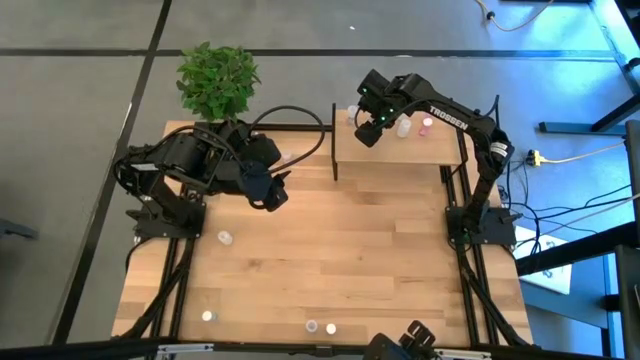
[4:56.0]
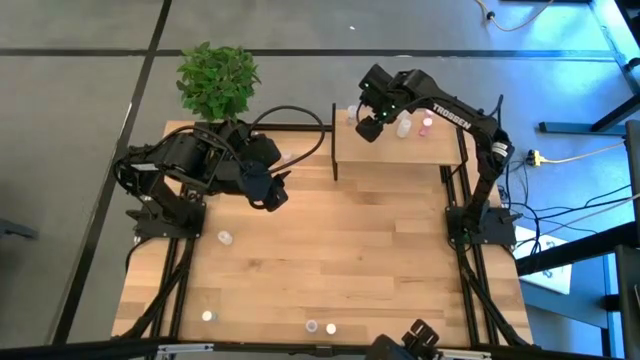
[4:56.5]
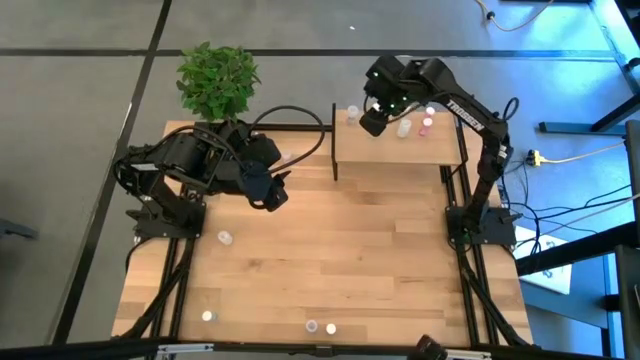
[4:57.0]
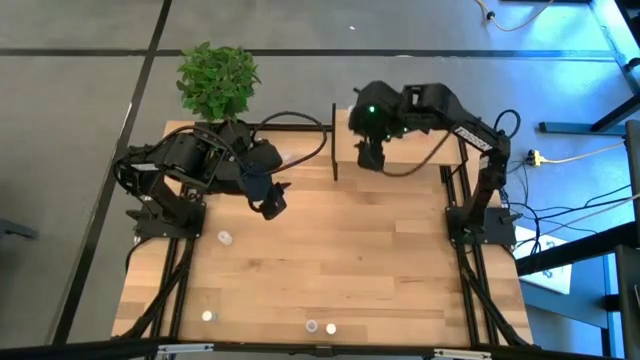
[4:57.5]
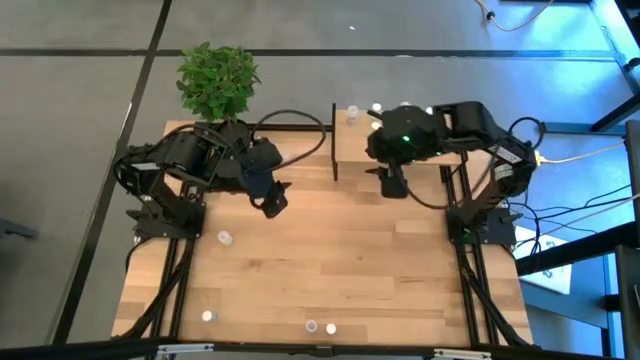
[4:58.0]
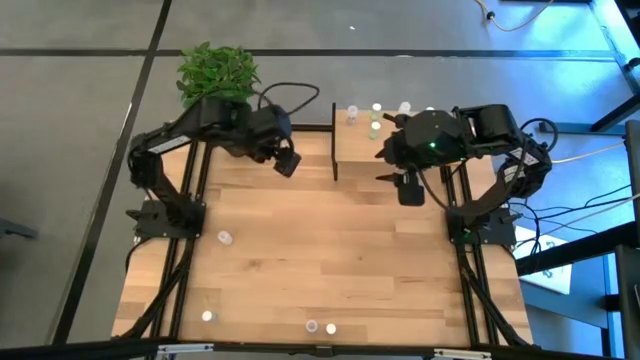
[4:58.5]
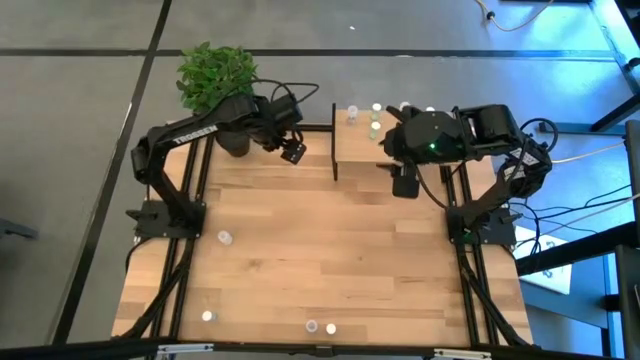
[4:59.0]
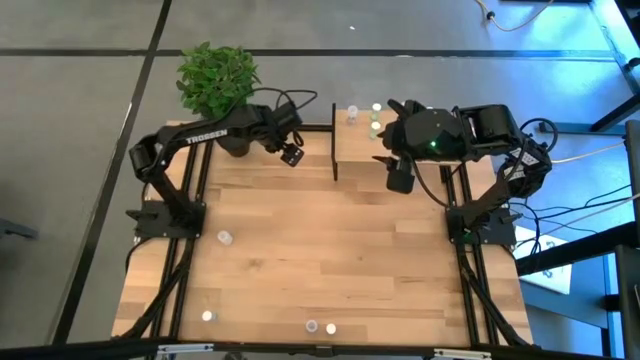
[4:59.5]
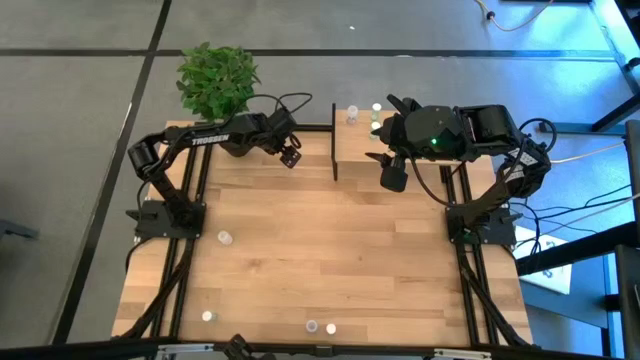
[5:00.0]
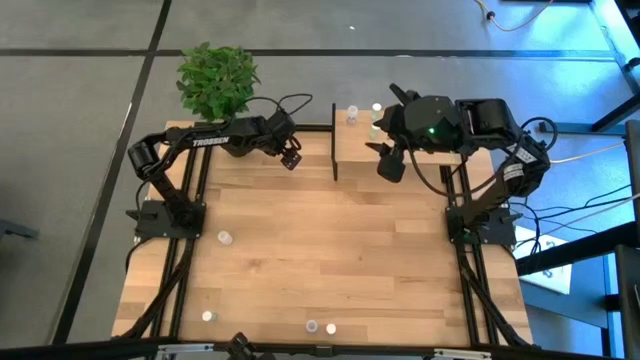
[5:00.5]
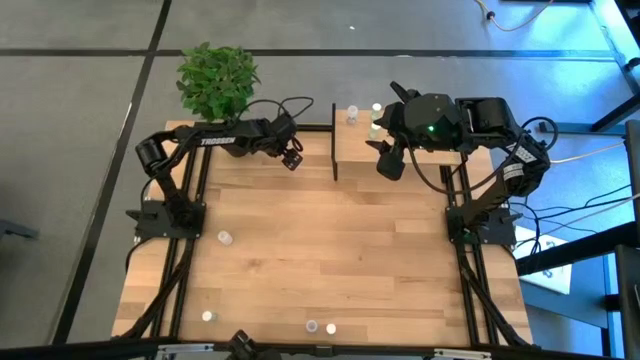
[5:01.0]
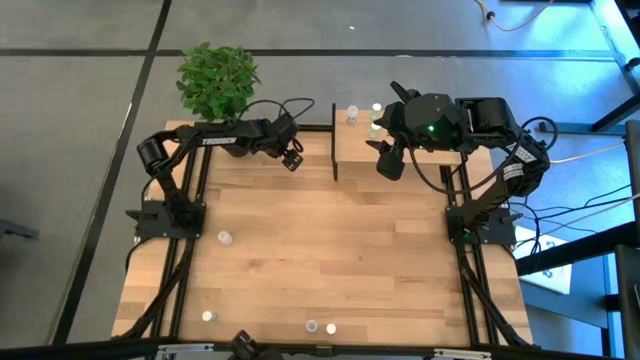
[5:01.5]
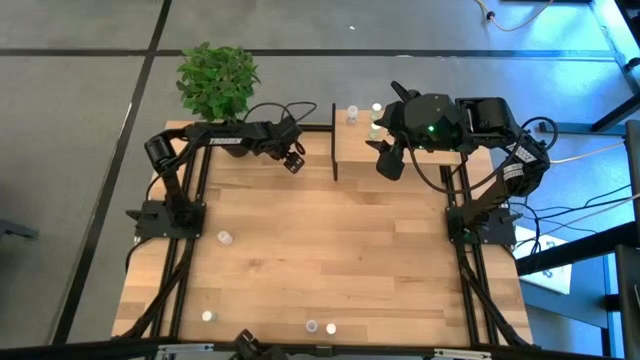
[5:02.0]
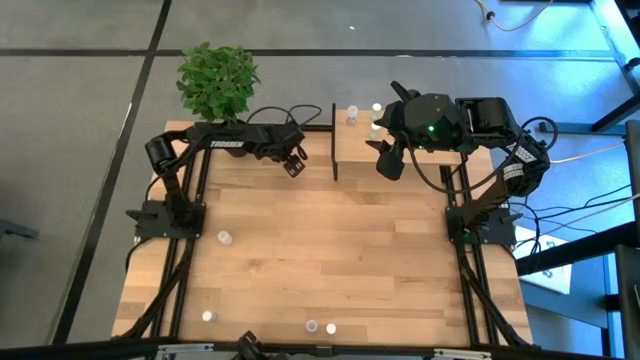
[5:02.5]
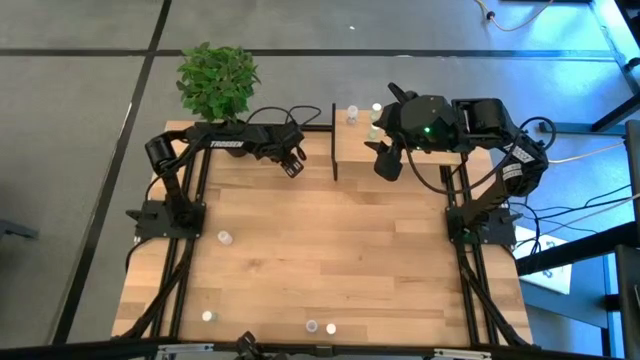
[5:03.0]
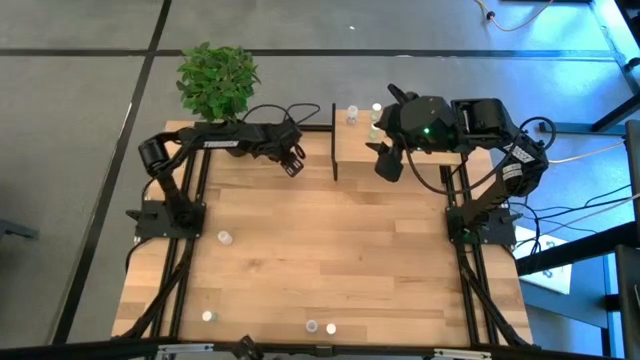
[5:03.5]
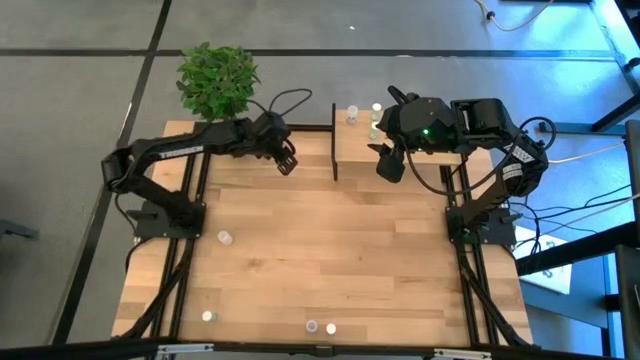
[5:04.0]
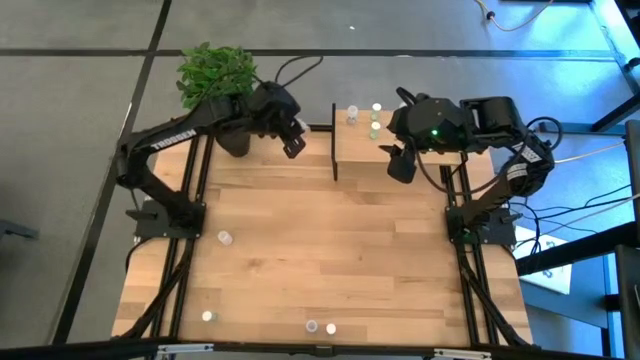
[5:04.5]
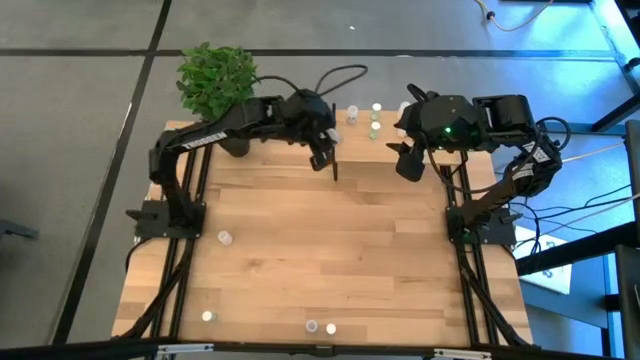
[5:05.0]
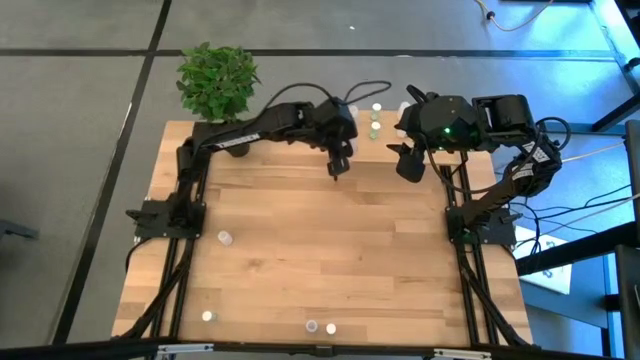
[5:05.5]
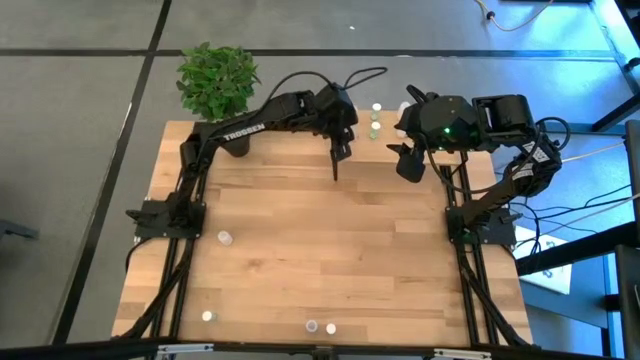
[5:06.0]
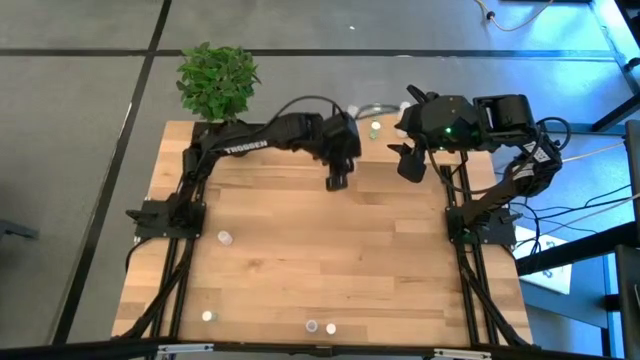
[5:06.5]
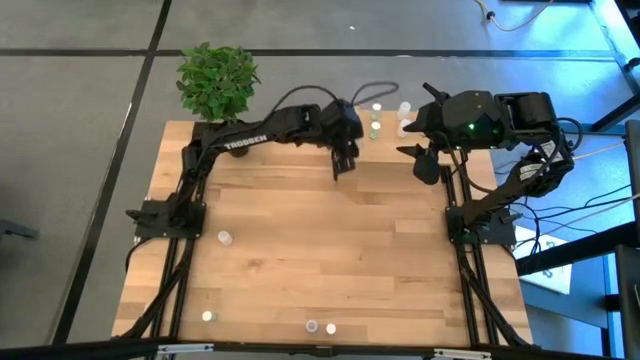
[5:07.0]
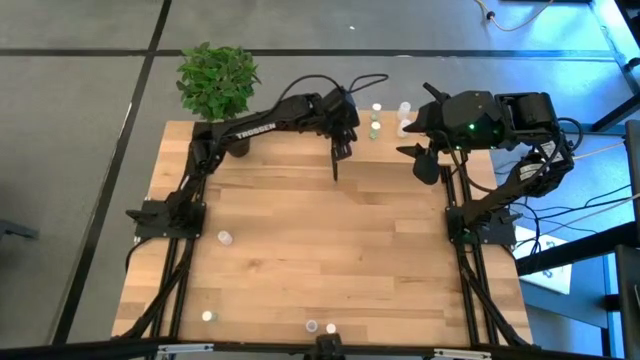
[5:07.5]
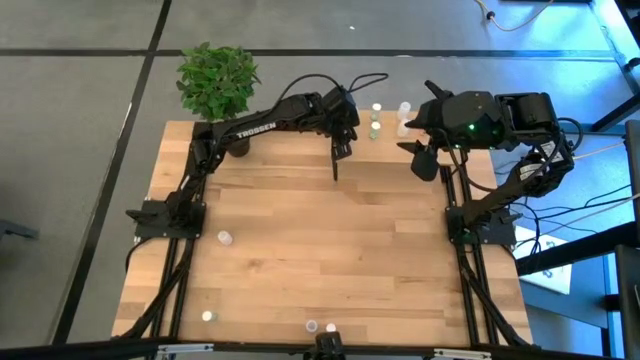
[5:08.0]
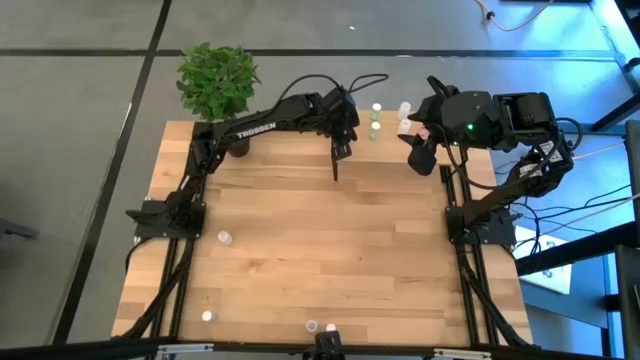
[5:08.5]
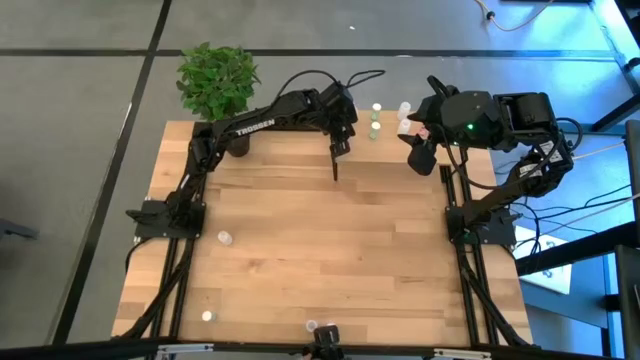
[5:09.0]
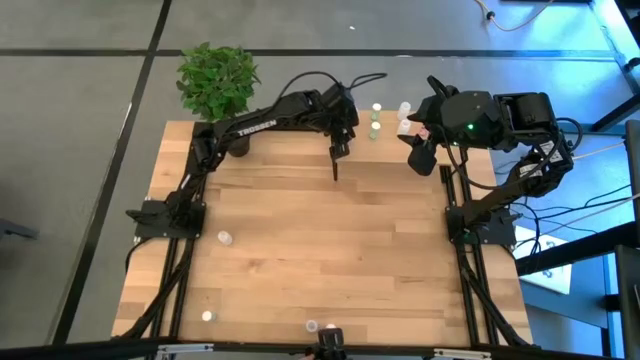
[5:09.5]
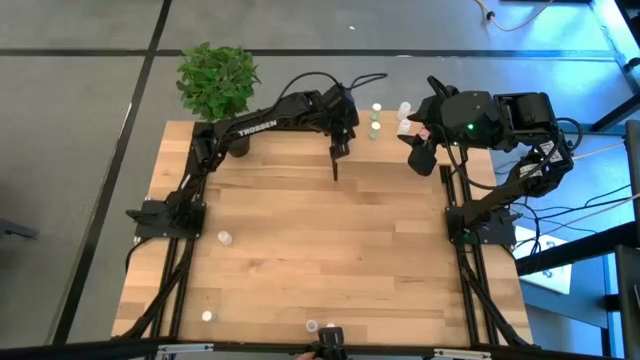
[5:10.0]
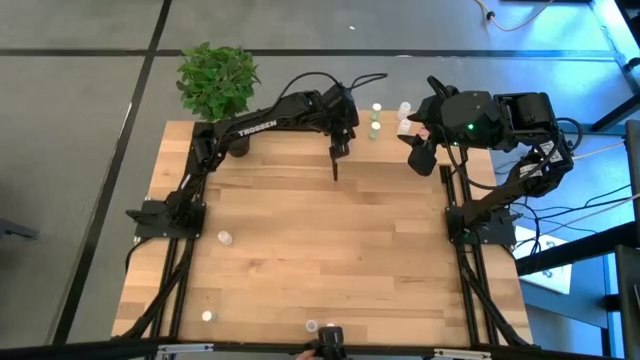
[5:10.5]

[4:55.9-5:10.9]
Task: Pick and place medicine bottles onto shelf by color
Put the top transparent pill bottle aligned with the other transparent pill bottle on the shelf
